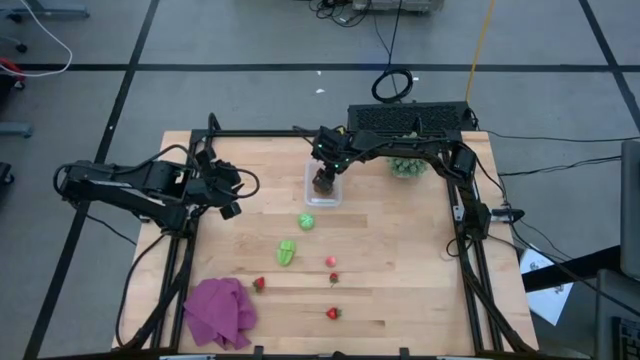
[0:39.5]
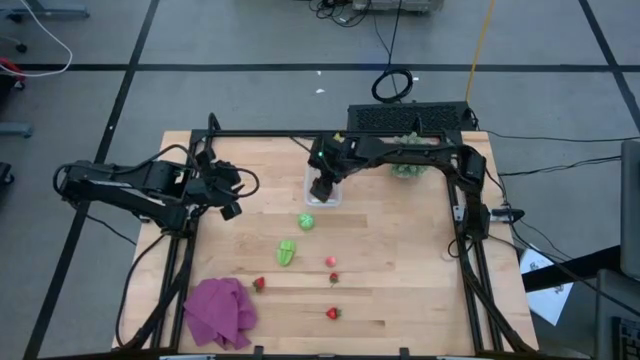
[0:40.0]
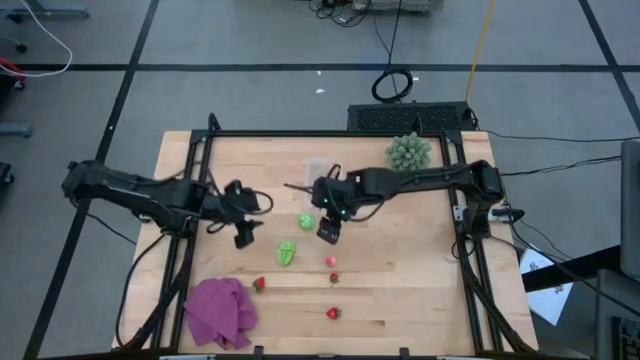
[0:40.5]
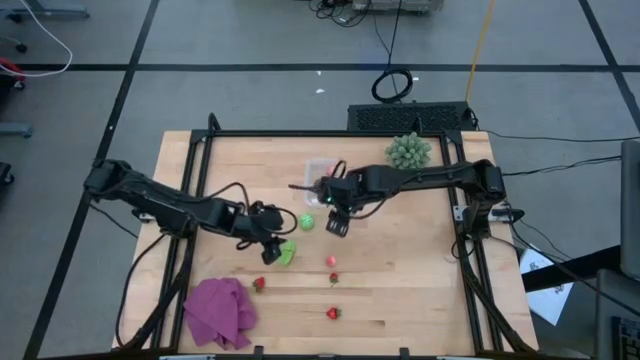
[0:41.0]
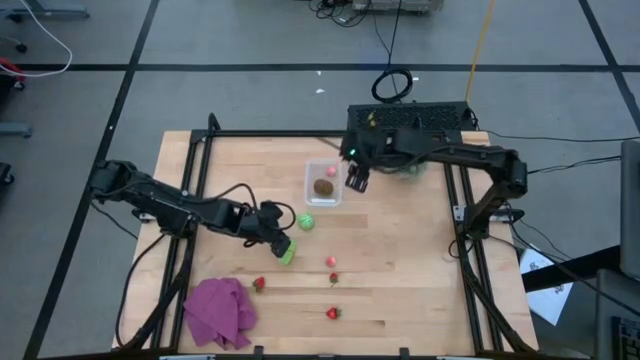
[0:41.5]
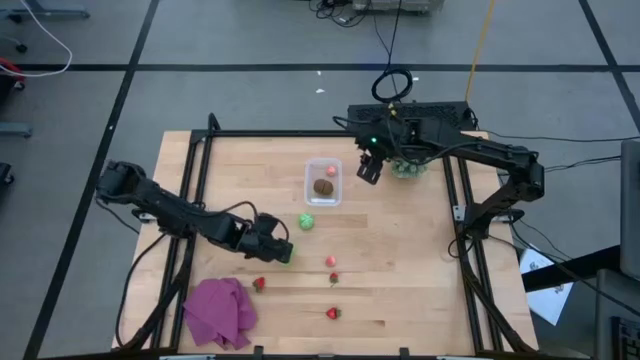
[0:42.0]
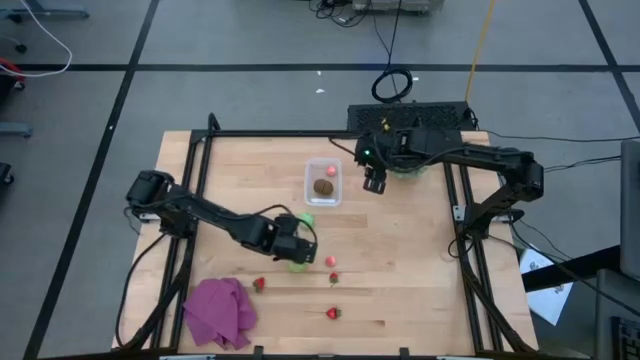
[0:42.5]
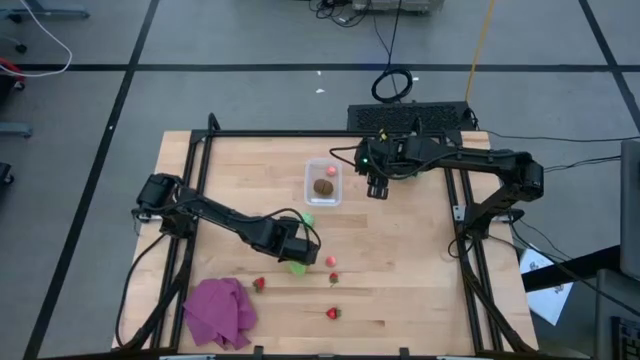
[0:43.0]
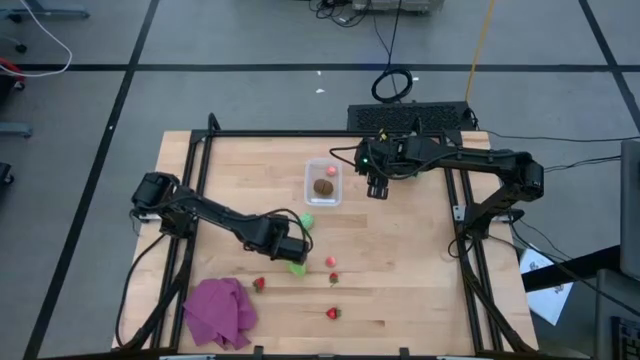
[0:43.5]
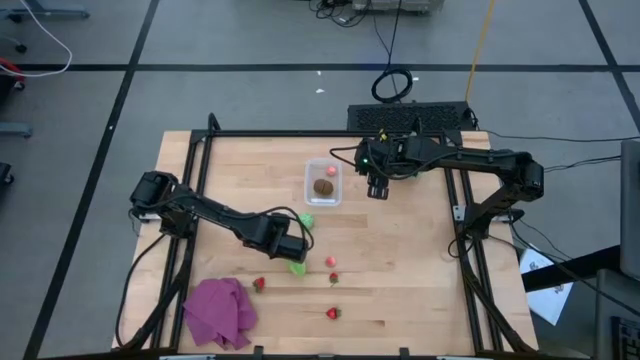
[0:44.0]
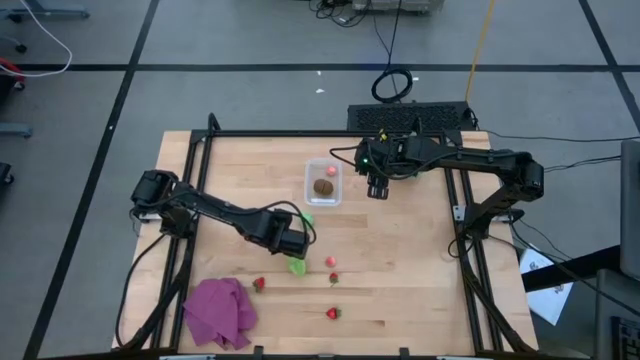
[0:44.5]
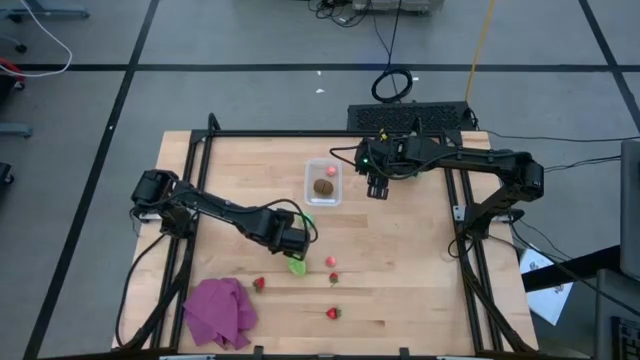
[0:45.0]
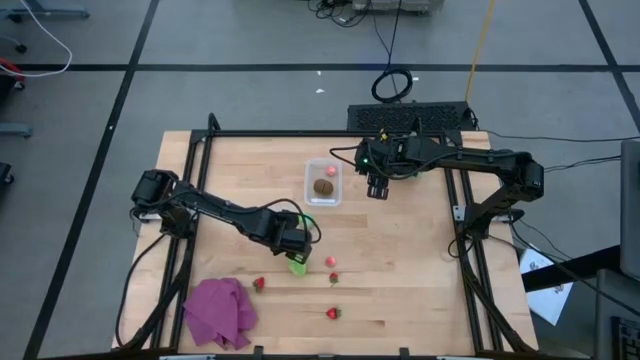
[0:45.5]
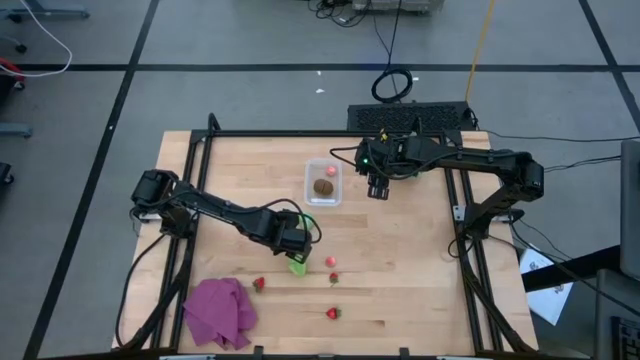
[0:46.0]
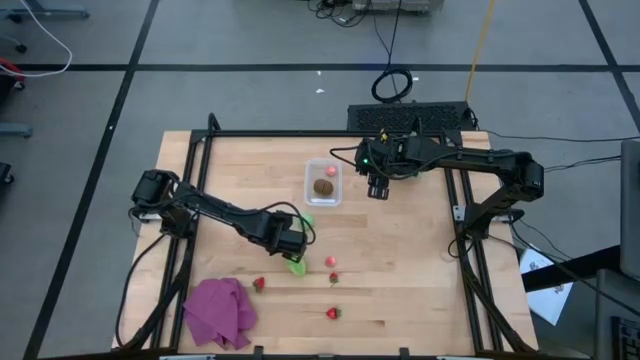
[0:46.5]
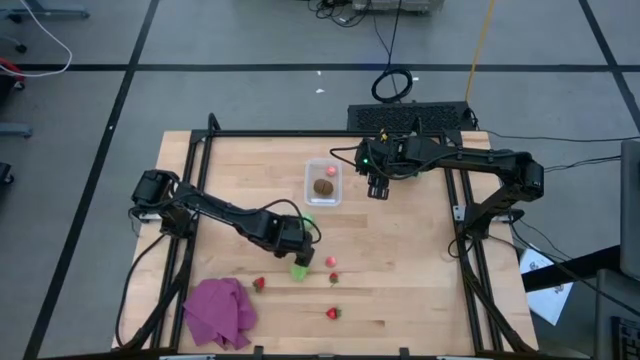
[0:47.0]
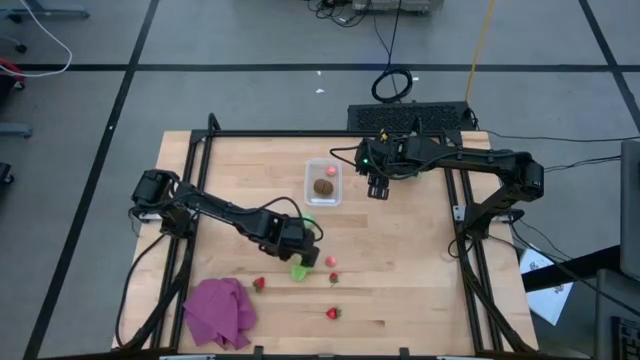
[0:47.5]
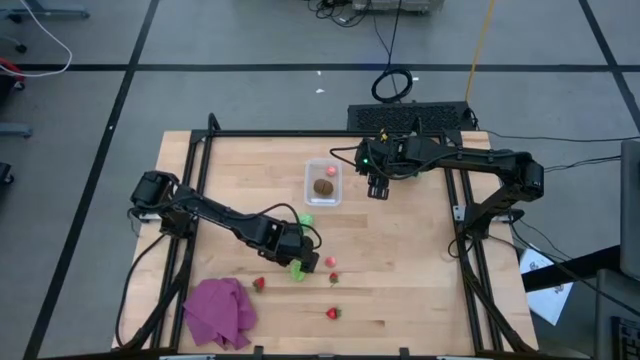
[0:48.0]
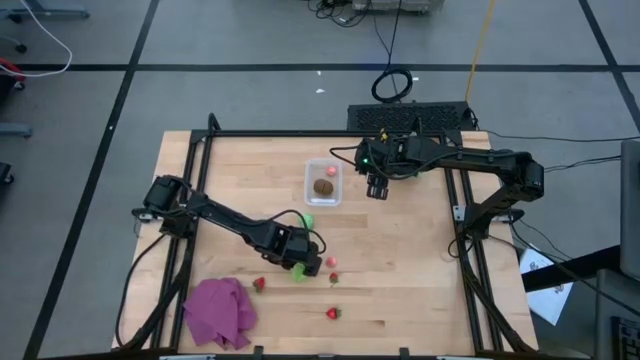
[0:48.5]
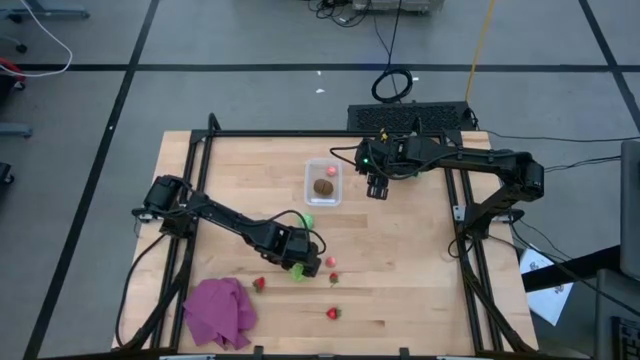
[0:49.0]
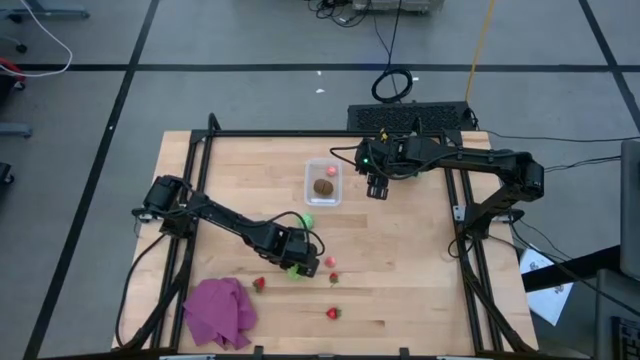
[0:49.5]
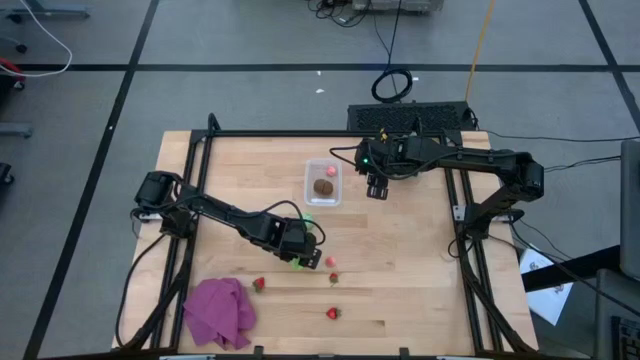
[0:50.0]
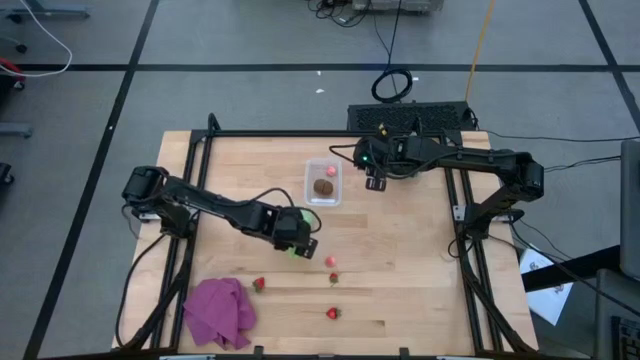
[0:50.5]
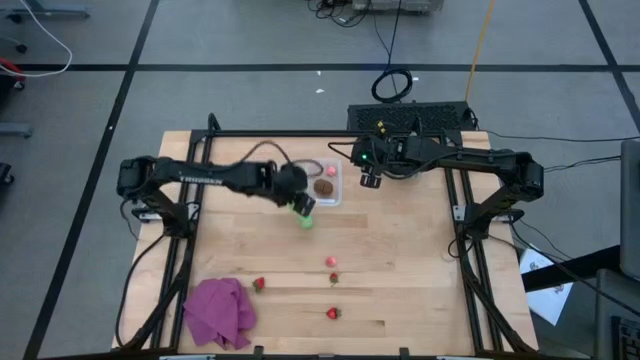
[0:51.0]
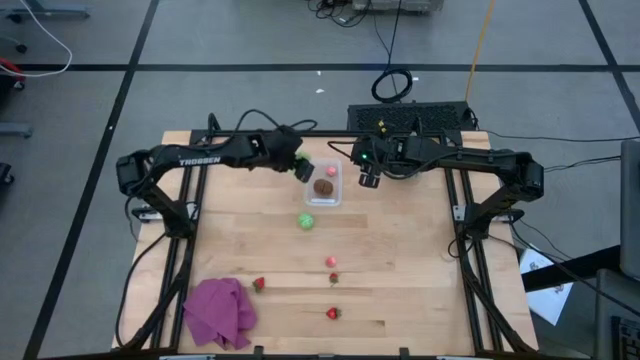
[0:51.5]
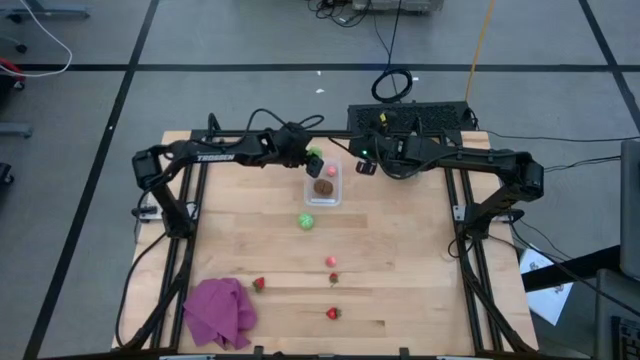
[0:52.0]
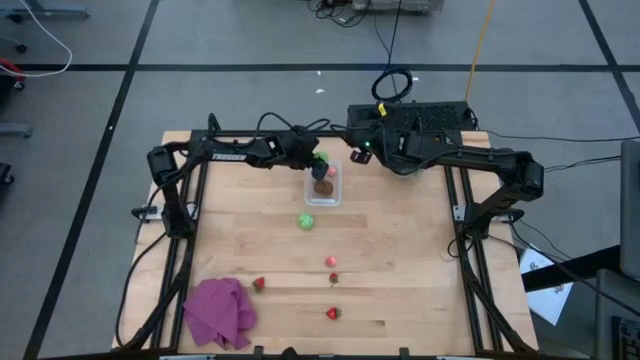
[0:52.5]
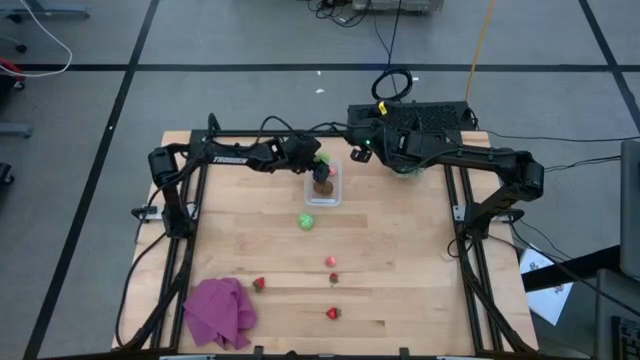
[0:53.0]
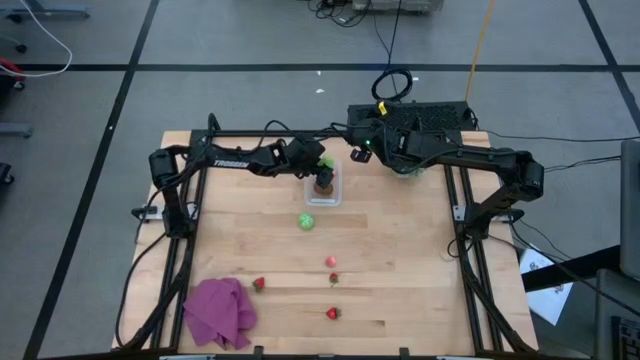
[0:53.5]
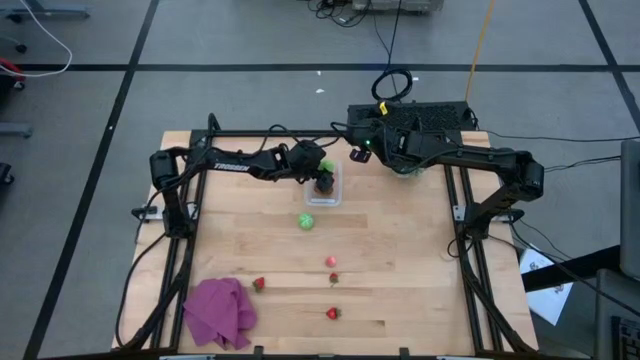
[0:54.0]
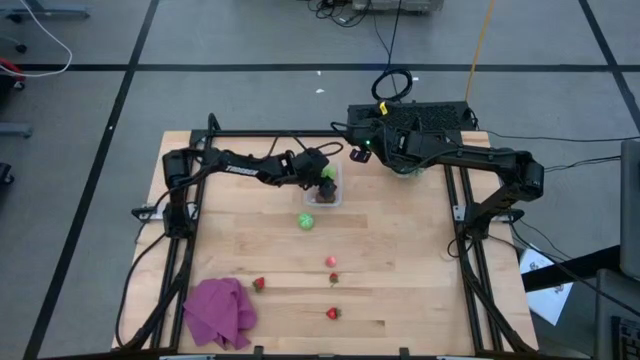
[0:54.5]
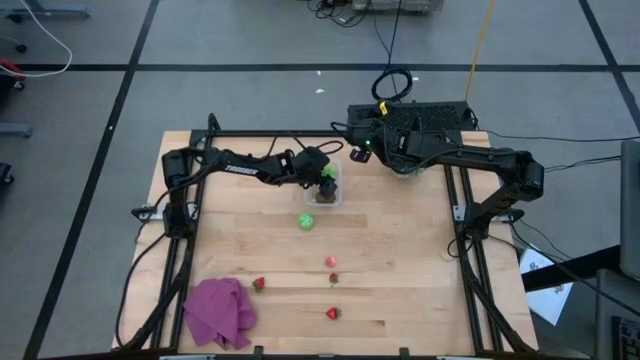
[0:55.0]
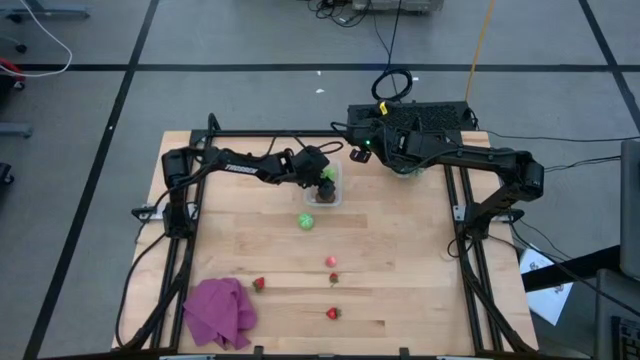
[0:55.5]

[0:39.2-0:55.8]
Task: Pick and placing Produce into tupperware
Put the starfruit into the transparent bin
